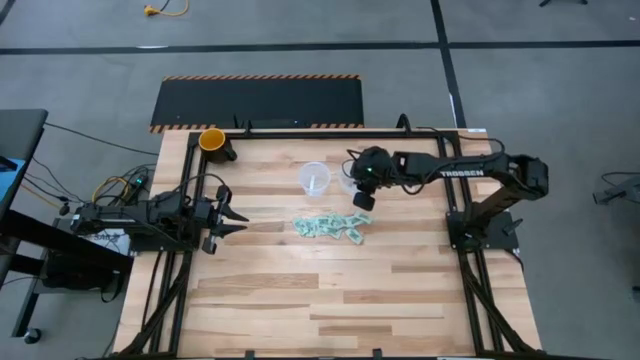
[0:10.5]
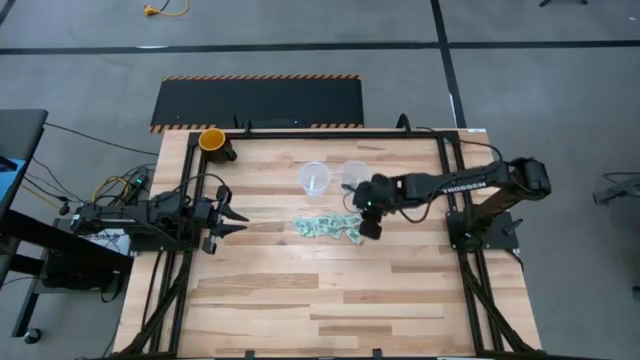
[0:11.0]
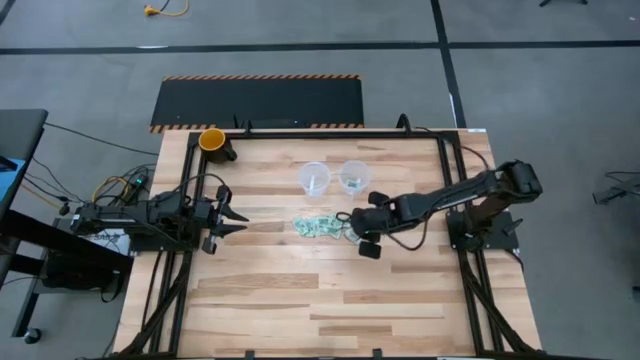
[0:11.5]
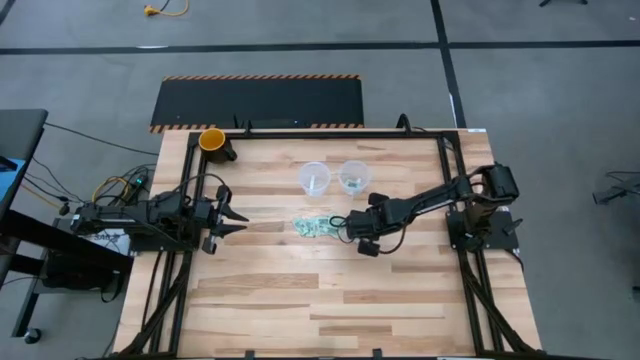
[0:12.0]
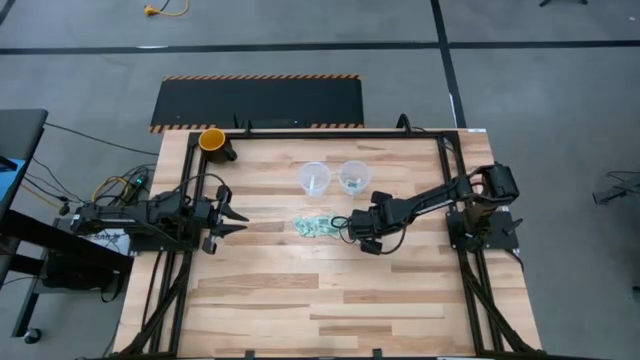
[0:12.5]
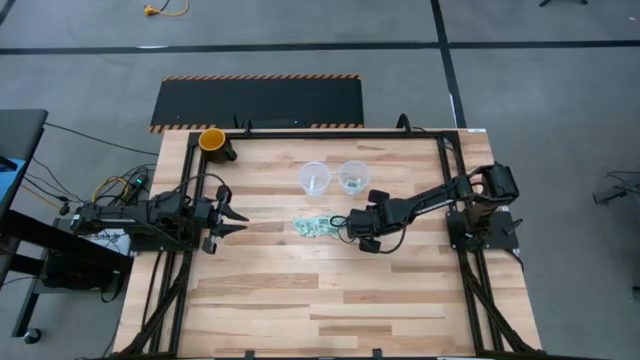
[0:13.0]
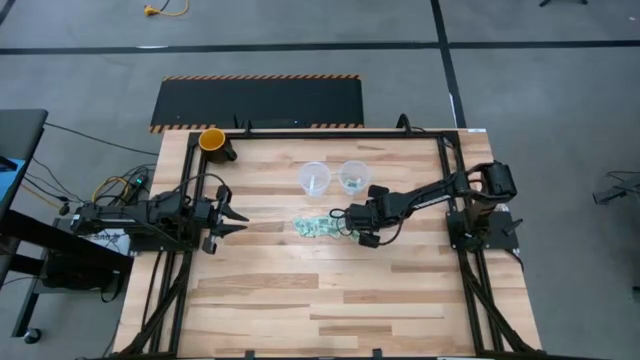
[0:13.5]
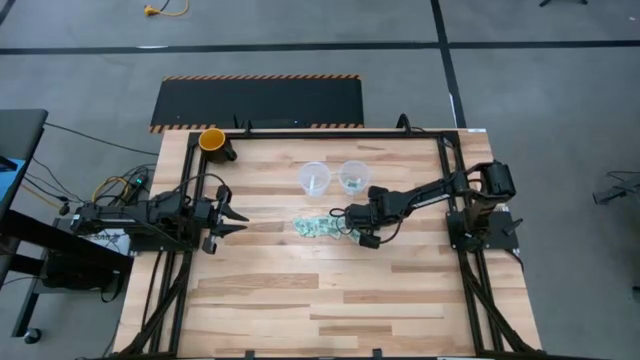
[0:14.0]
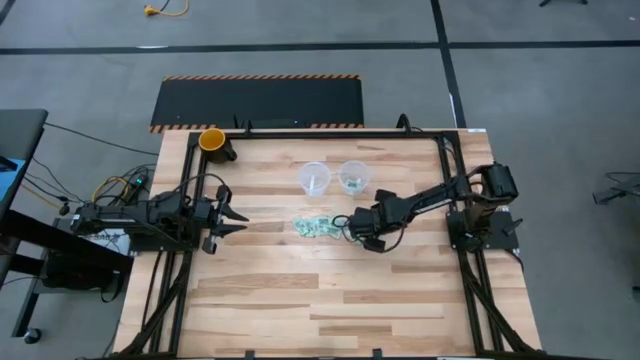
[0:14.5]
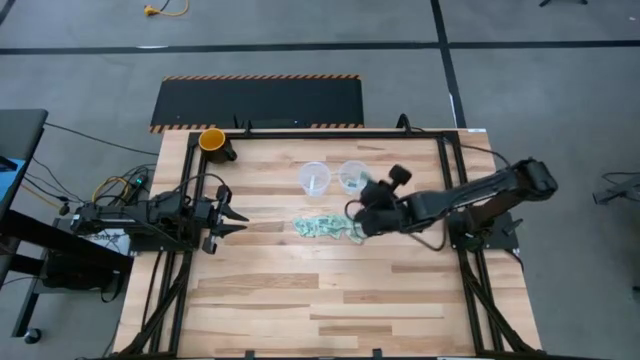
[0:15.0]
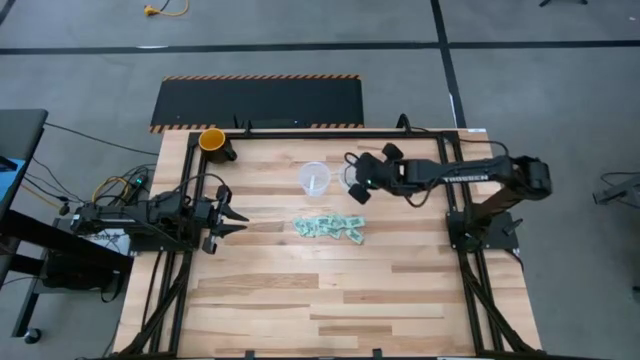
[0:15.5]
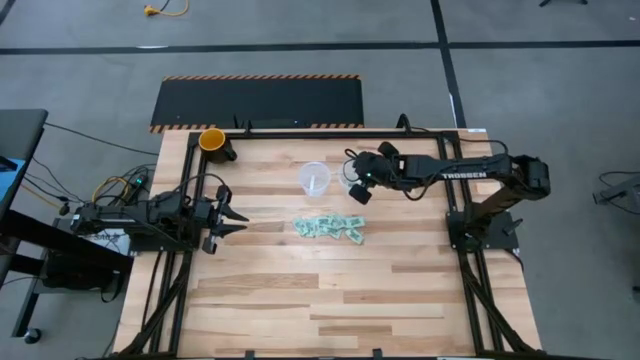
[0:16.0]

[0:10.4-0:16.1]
Task: Pick and place items into bin
Put the green stevia packet into the right transparent bin

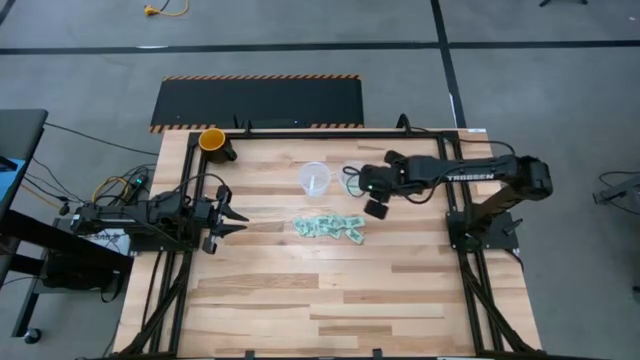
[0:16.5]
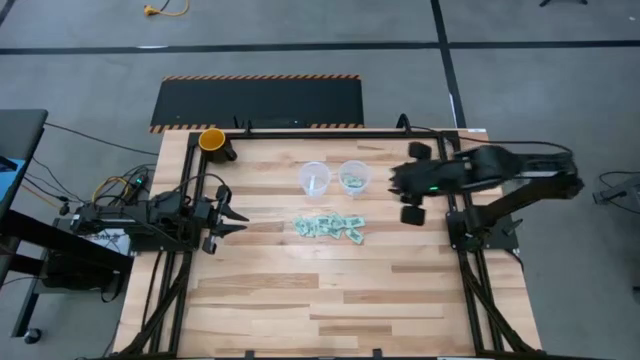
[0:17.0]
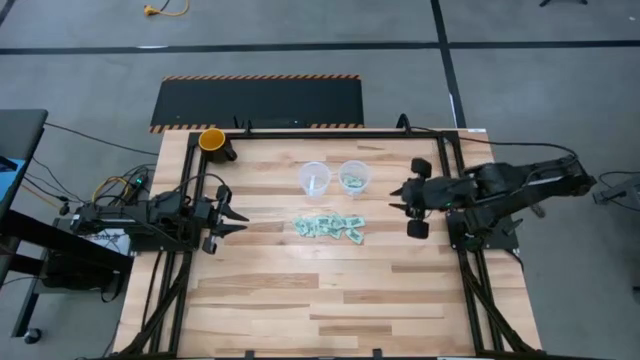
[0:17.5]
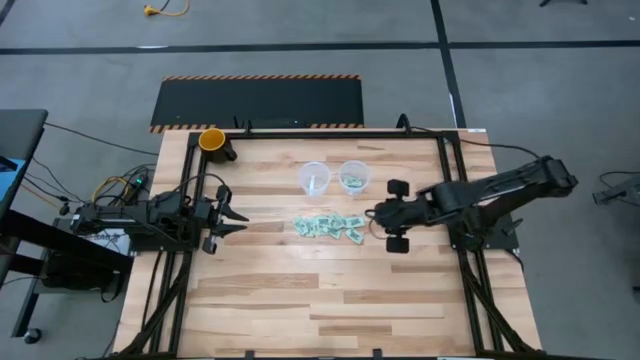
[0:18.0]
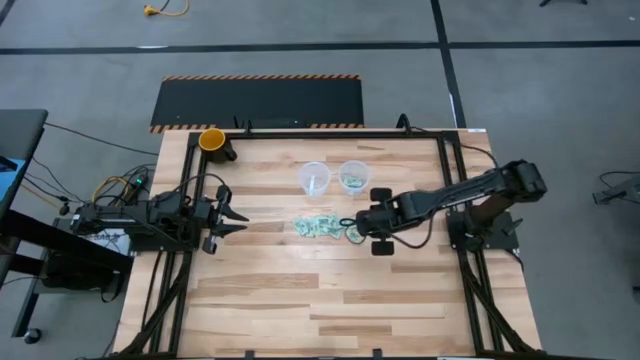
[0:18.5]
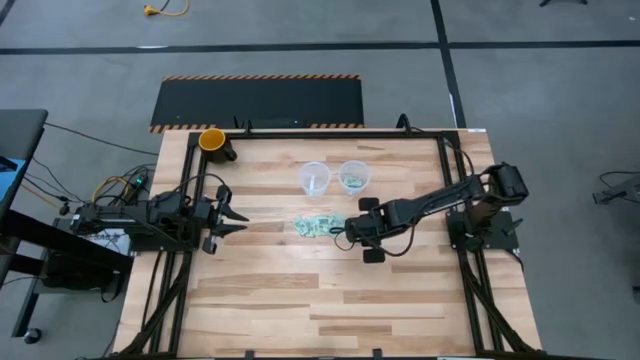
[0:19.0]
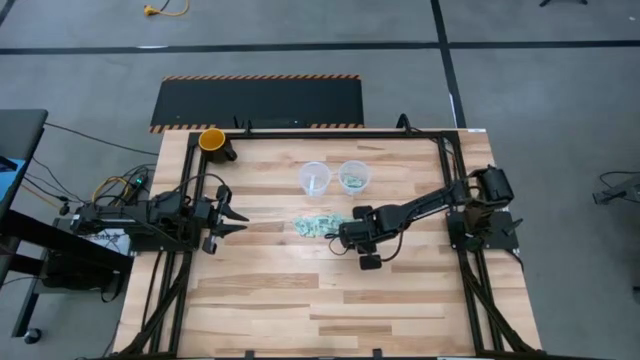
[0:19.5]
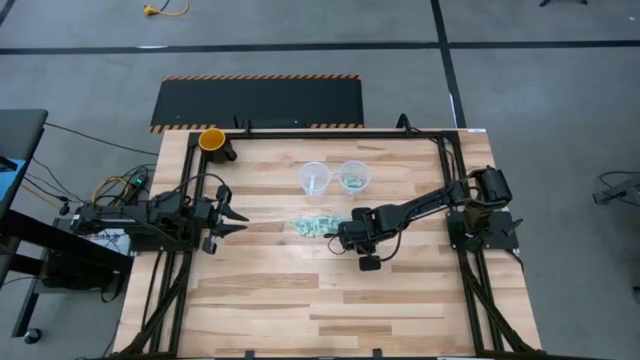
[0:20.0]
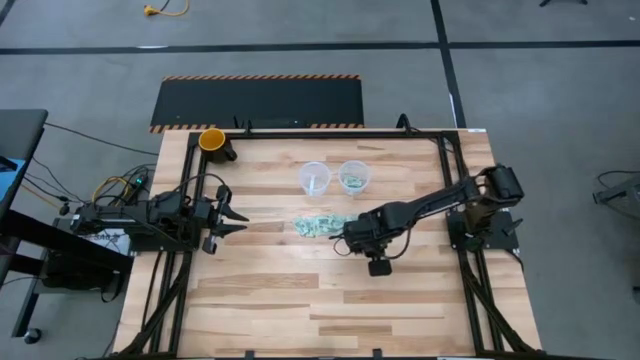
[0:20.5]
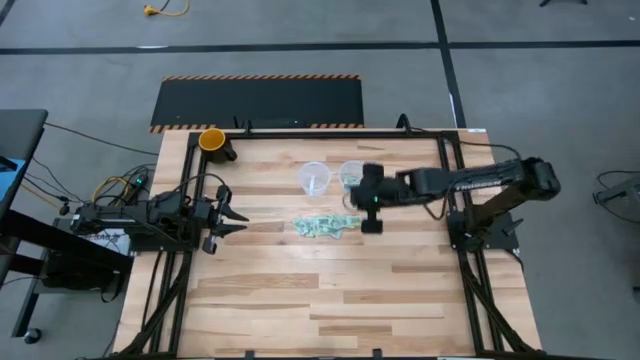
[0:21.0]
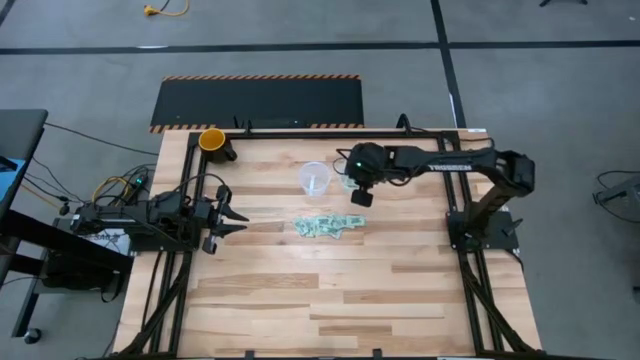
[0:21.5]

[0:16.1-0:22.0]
Put the green stevia packet into the right transparent bin

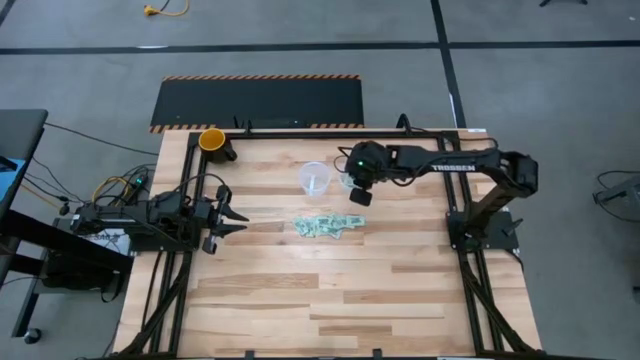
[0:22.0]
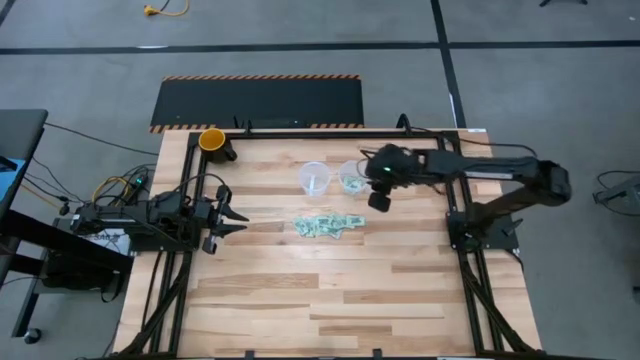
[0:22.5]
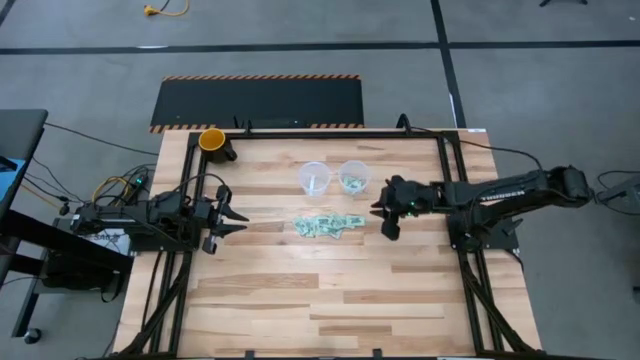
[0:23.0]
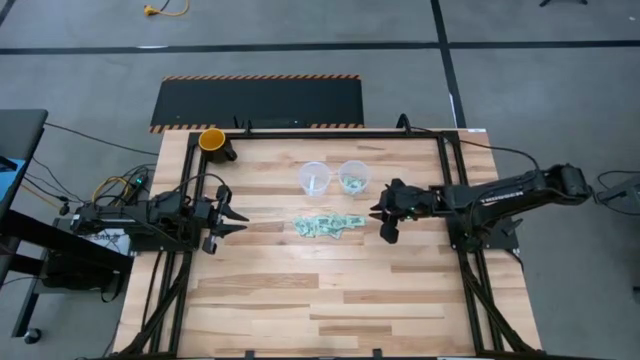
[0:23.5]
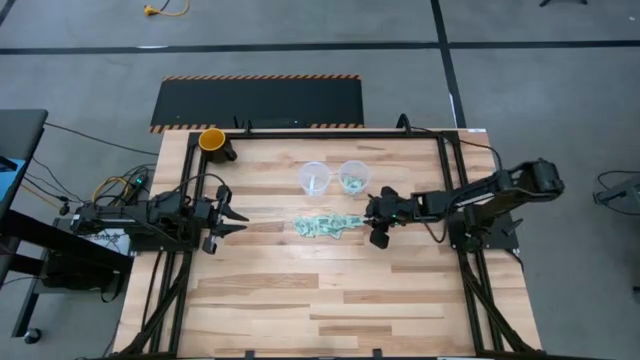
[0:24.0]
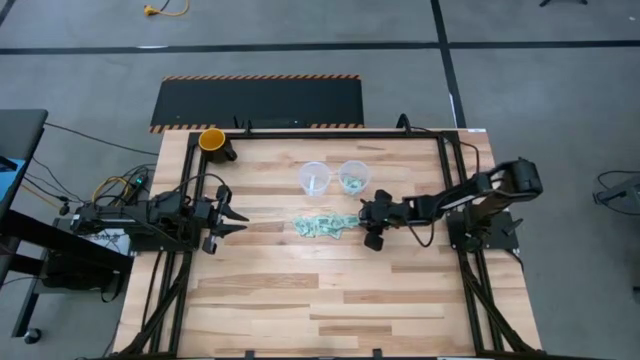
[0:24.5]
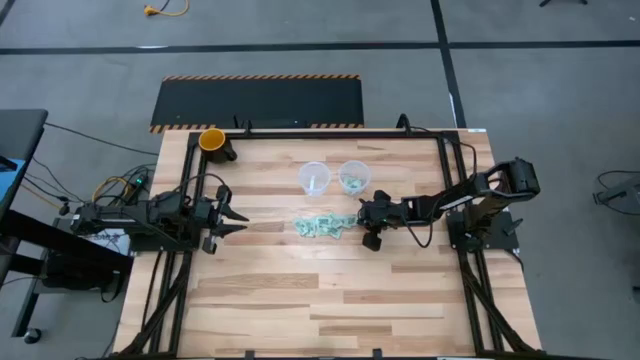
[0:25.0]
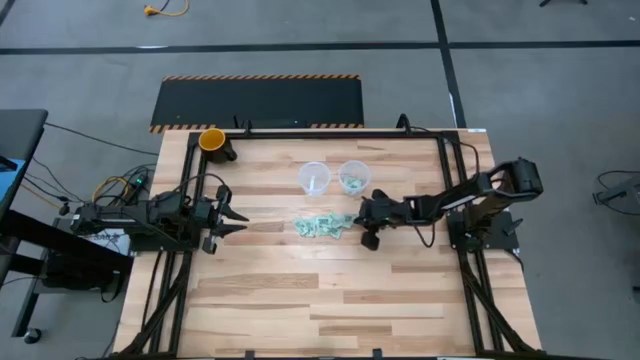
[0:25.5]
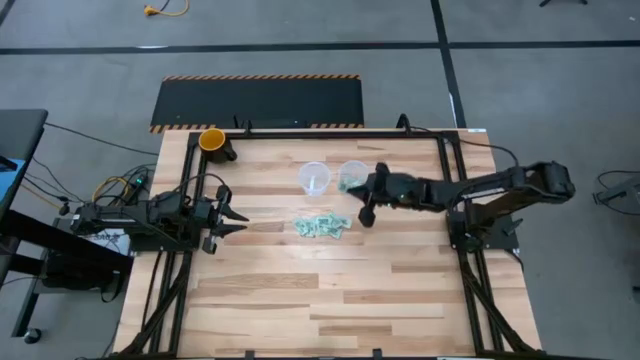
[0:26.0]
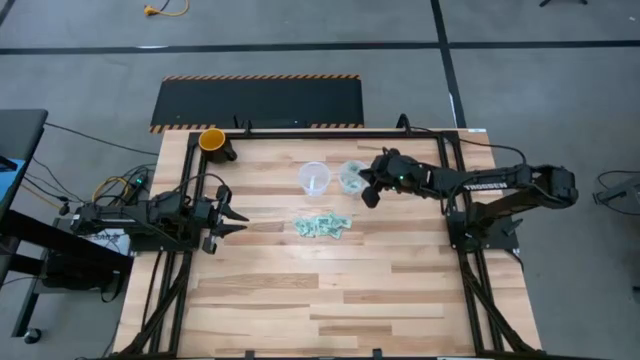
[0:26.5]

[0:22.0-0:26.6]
Put the green stevia packet into the right transparent bin

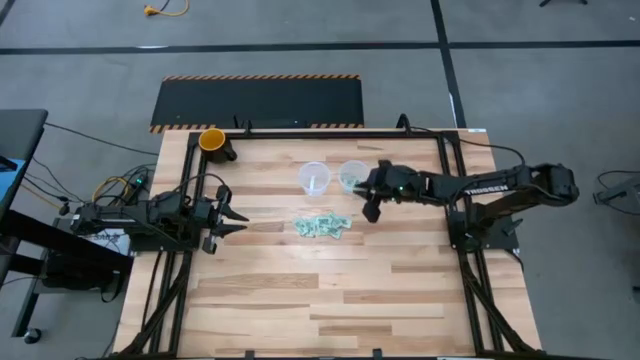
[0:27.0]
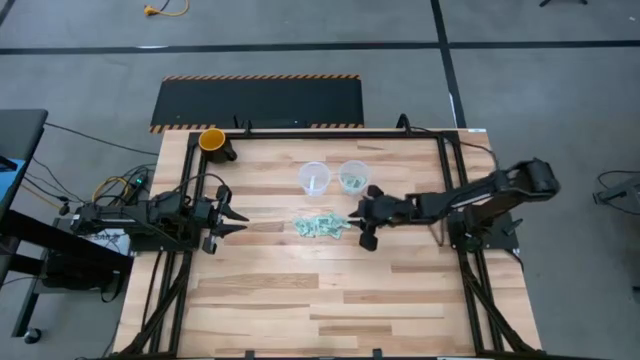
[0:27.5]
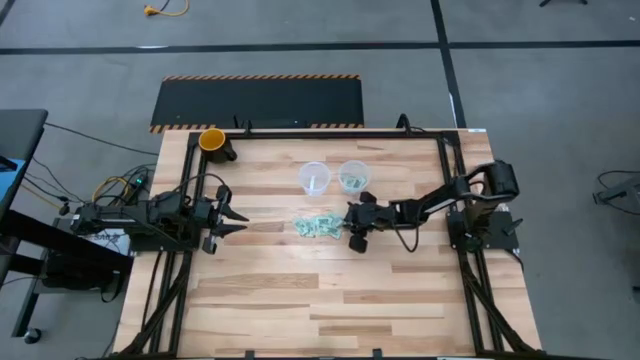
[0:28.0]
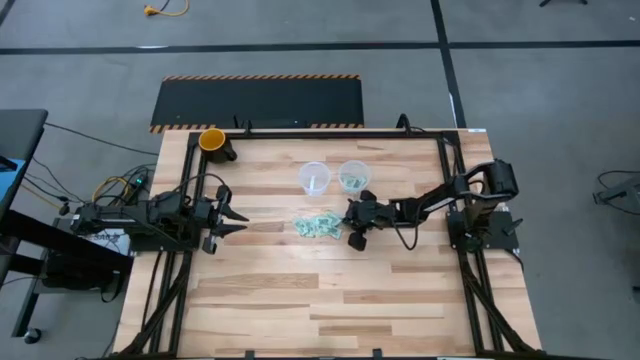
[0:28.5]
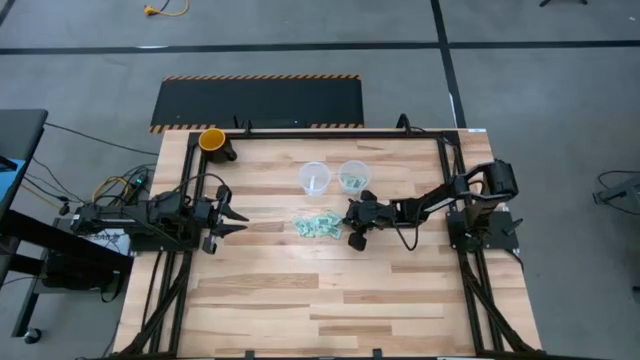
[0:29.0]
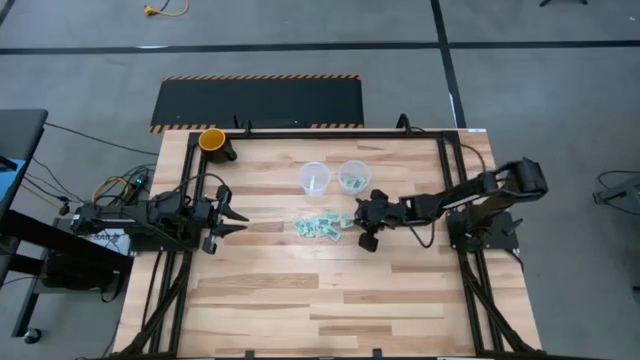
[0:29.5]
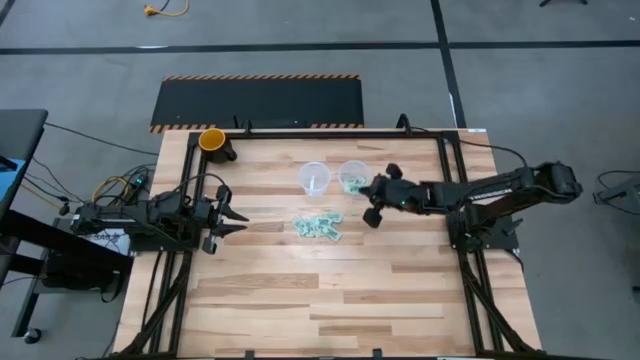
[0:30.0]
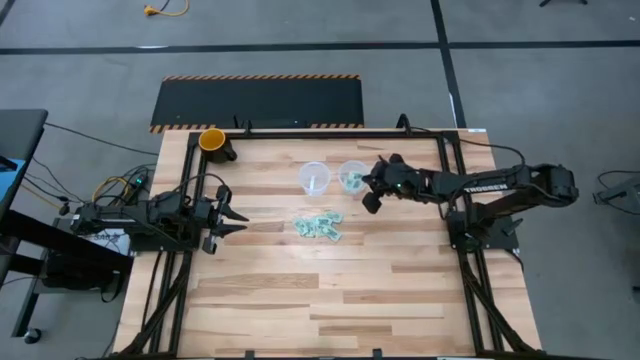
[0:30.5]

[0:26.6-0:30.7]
Put the green stevia packet into the right transparent bin

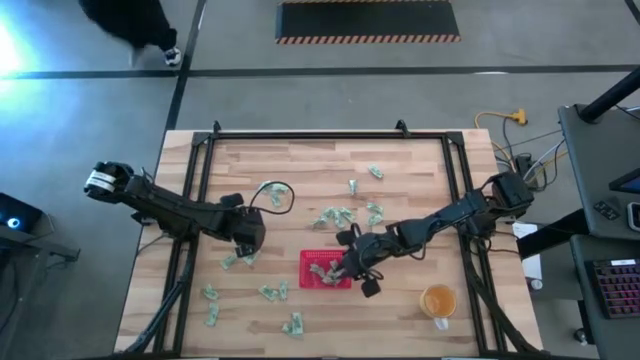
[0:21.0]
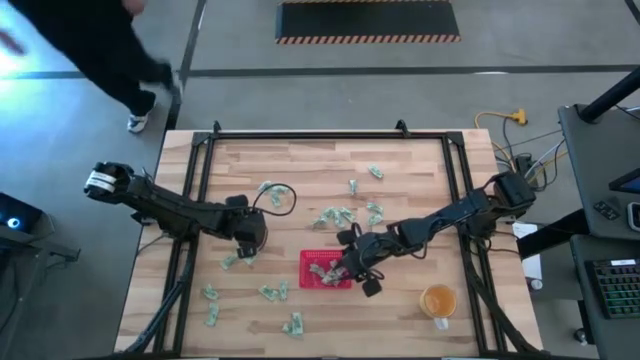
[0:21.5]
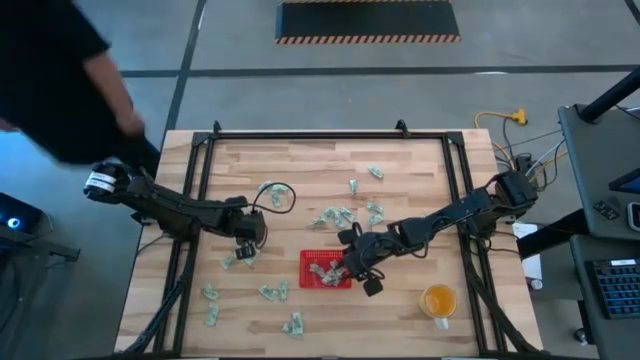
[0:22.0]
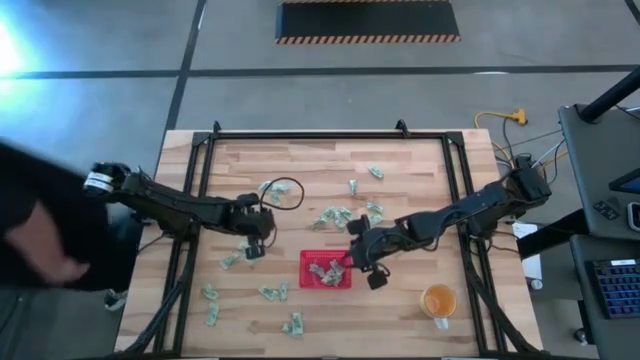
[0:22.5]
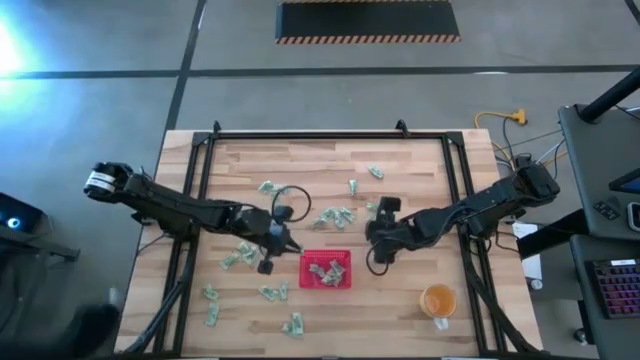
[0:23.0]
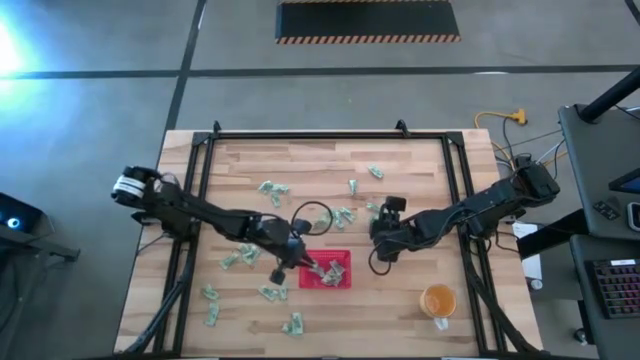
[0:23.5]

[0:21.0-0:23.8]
Task: Pick and place Stevia / Truvia into bins
Put the white stevia packet into the red bin
